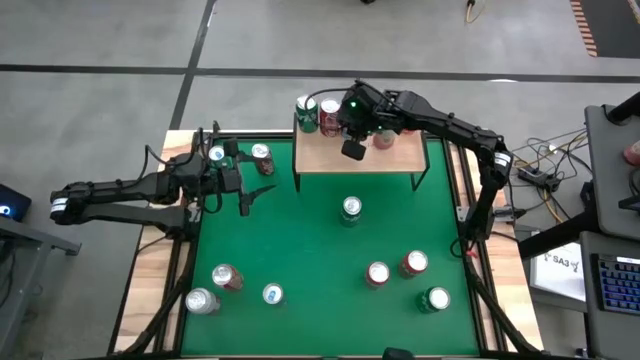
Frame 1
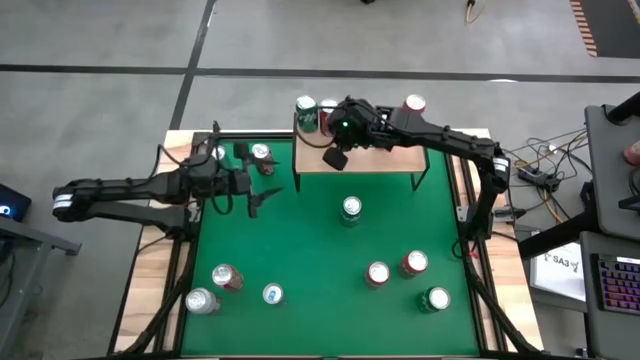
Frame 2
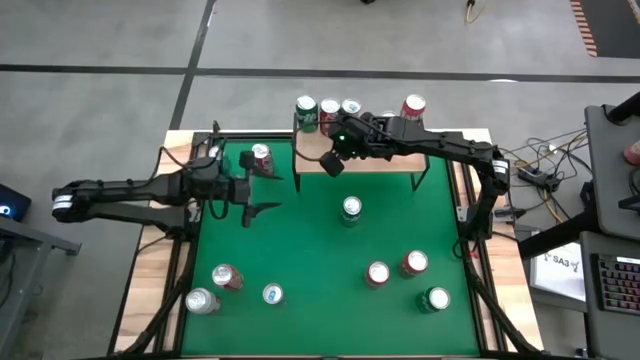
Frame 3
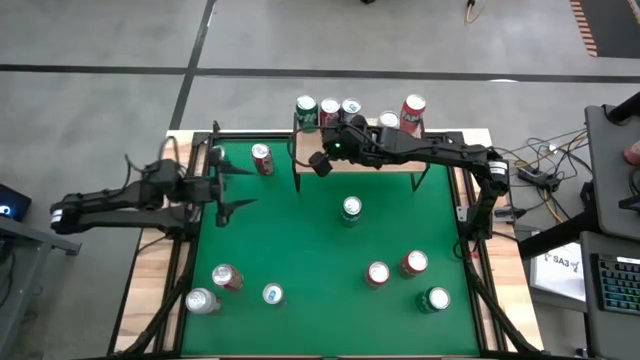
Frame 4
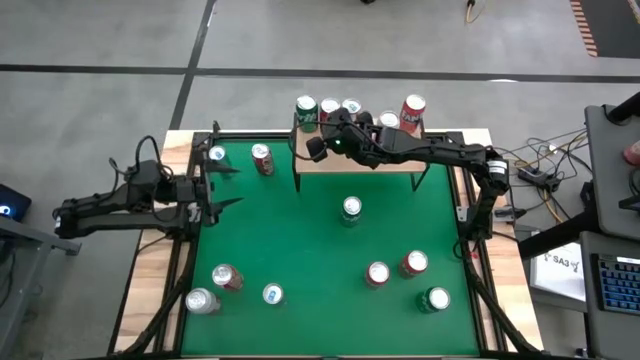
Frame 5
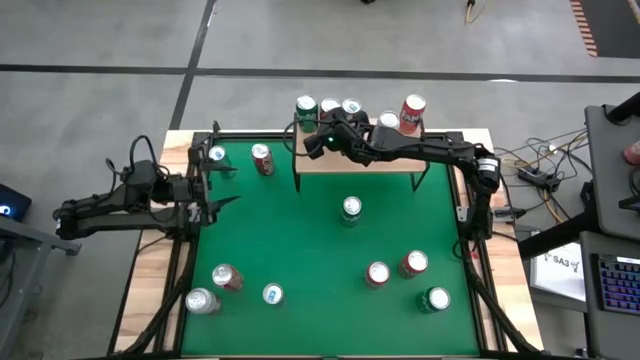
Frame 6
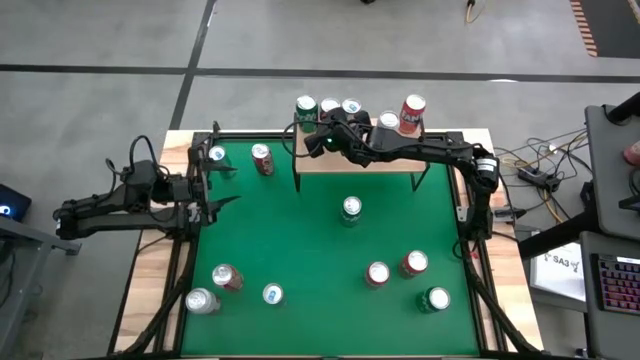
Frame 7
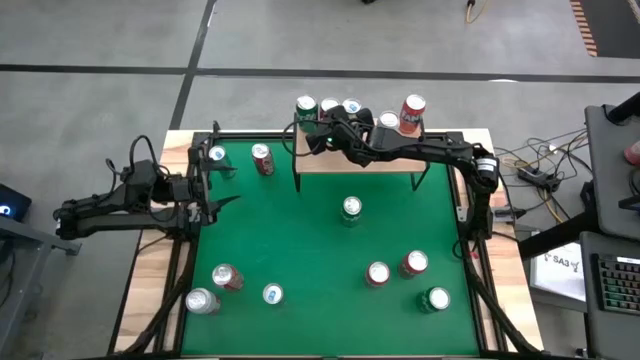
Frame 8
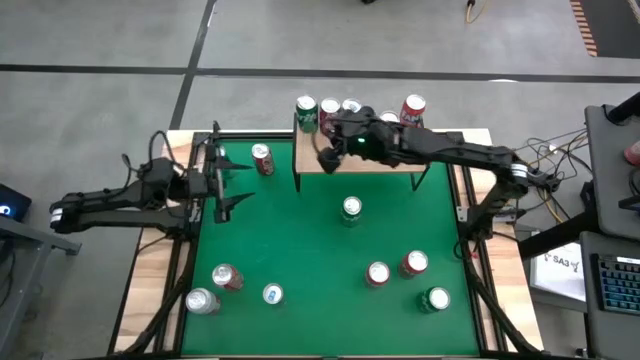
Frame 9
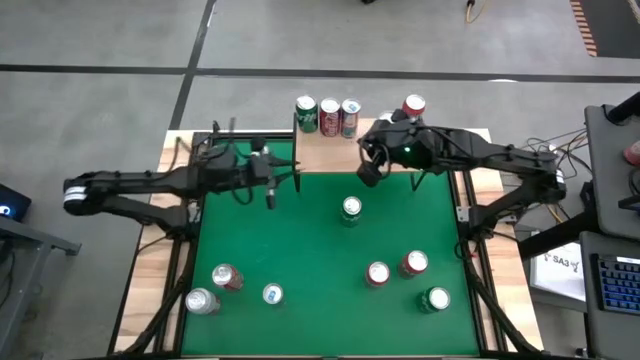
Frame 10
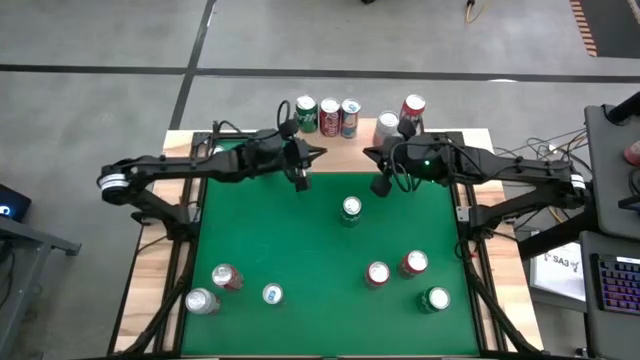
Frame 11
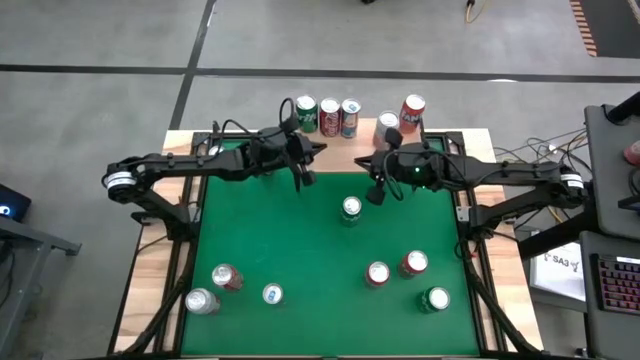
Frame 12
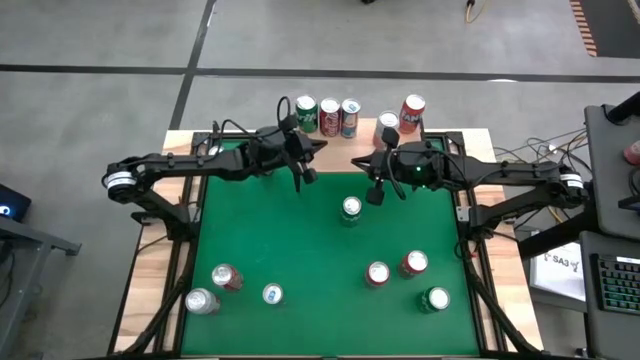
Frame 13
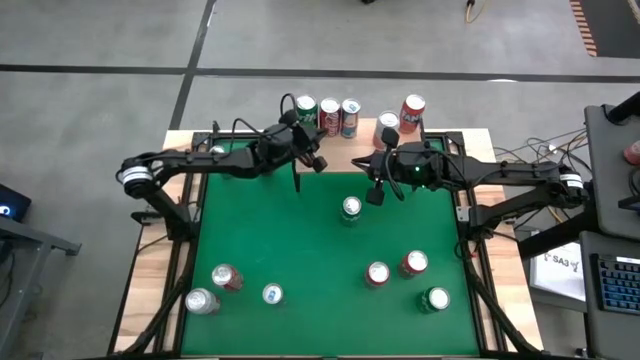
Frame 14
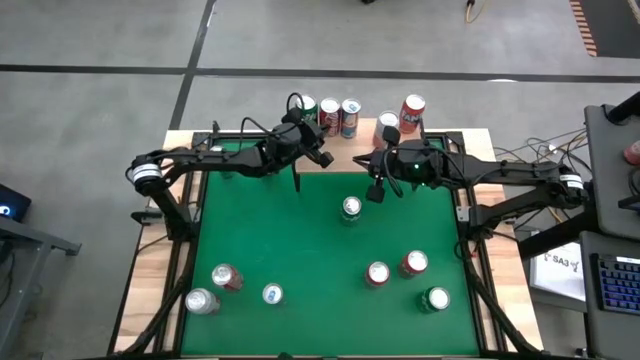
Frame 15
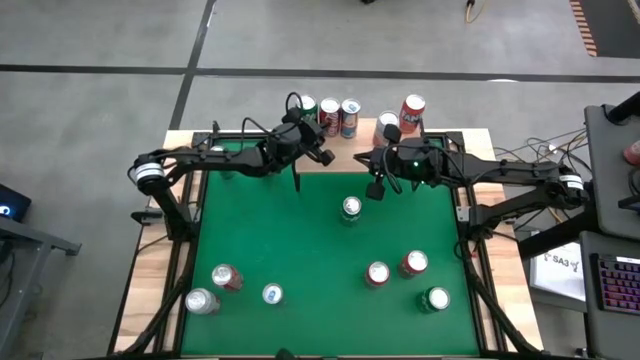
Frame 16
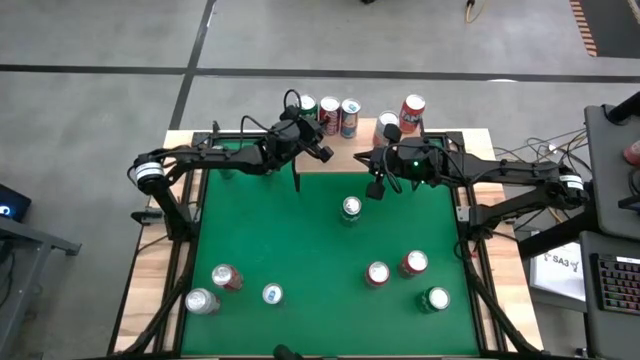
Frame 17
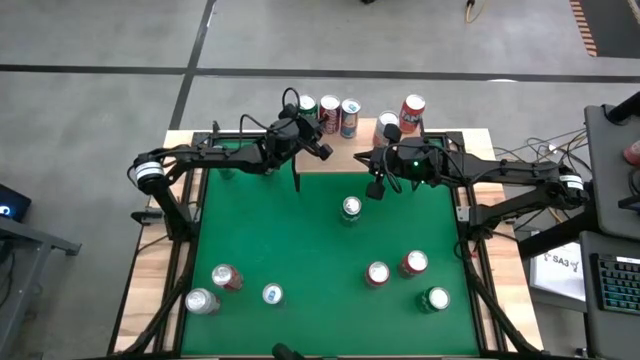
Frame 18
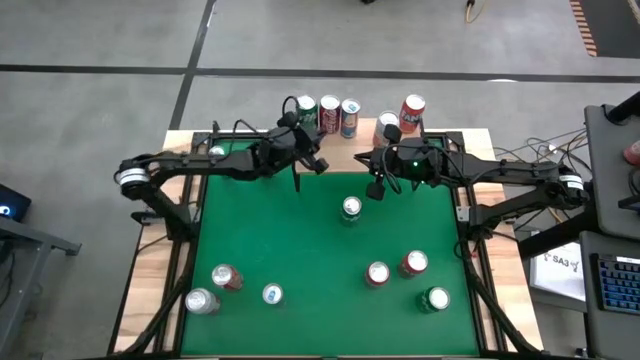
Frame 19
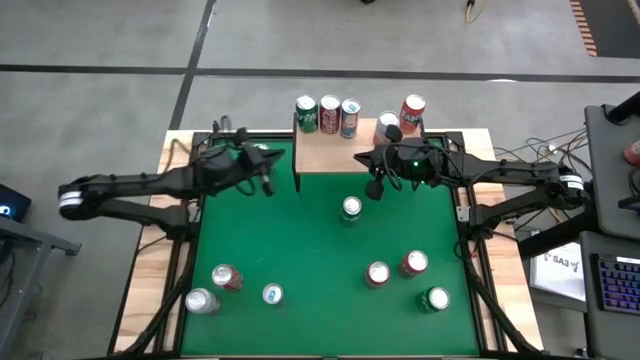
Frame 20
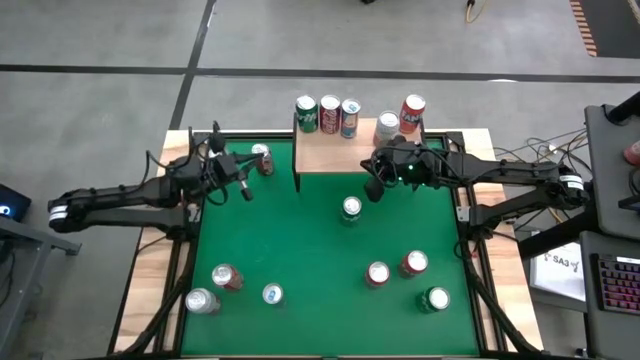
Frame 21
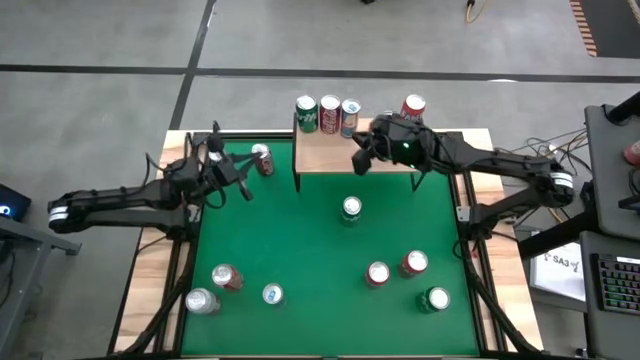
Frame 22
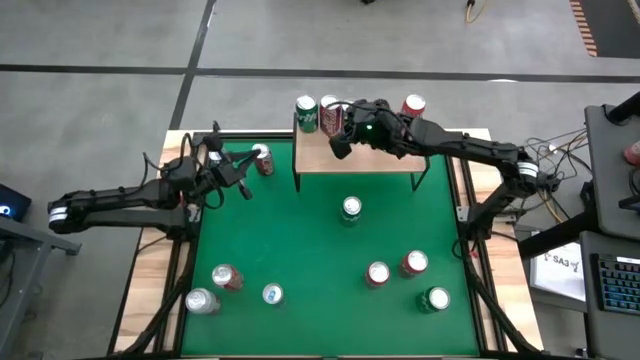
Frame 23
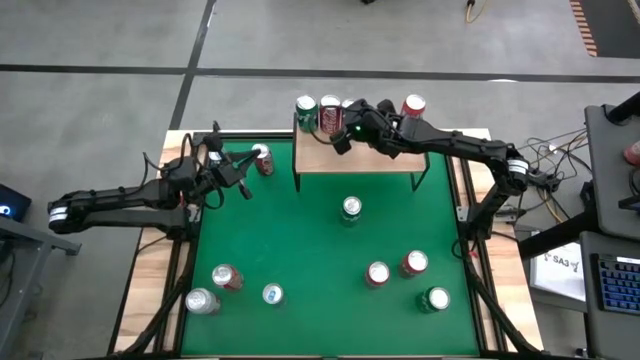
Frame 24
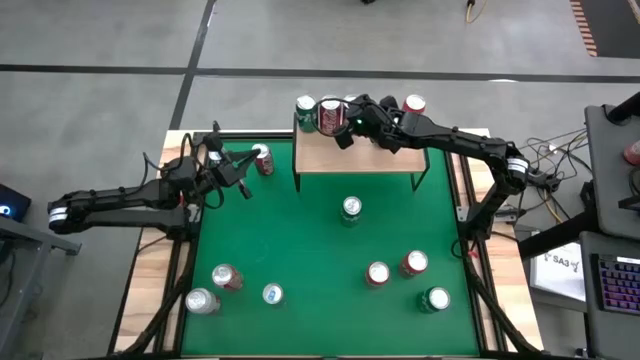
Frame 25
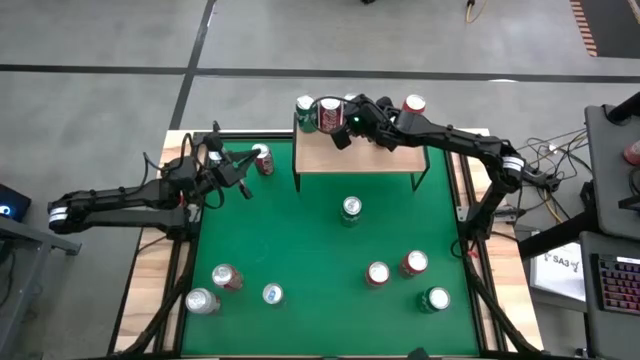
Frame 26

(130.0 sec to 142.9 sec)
Task: Place canned beverage on shelf
Adjust the soda cans on the shelf

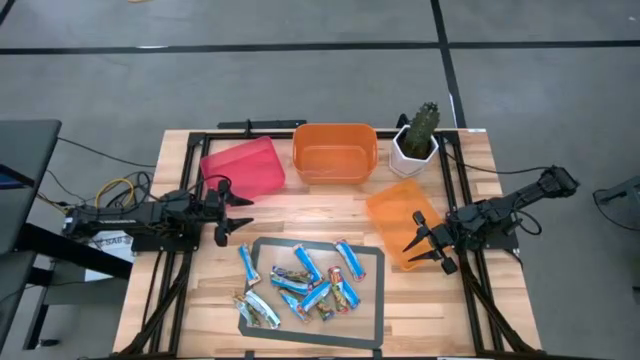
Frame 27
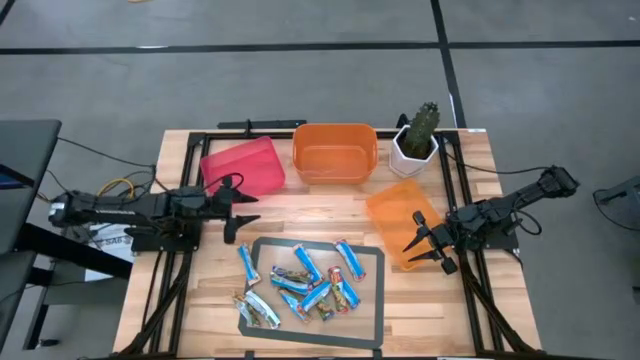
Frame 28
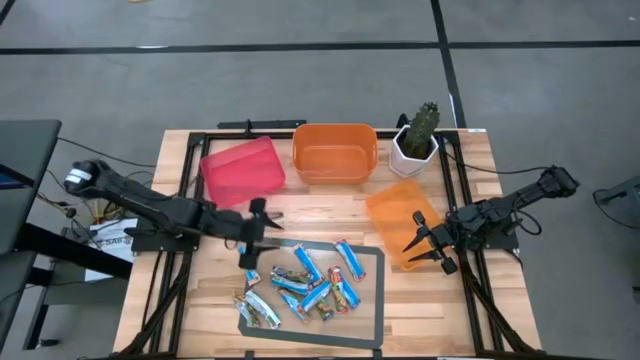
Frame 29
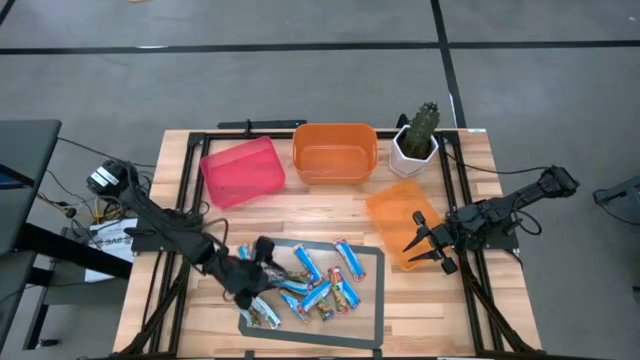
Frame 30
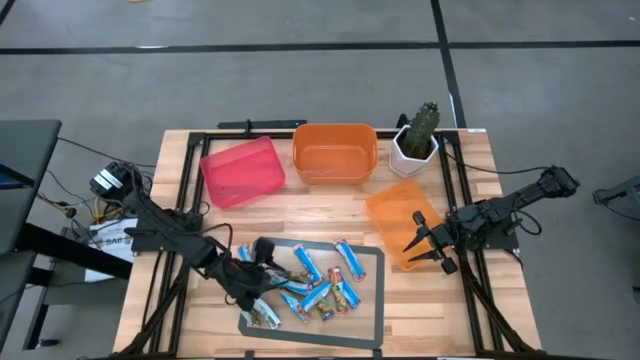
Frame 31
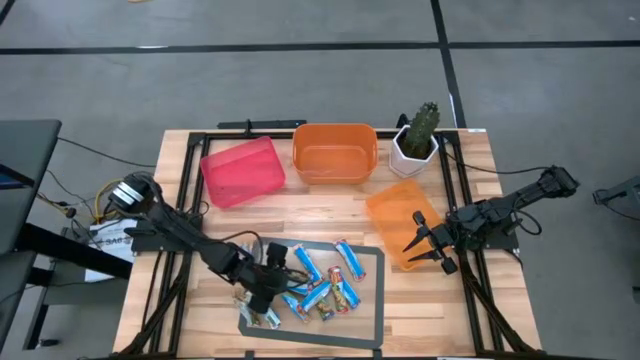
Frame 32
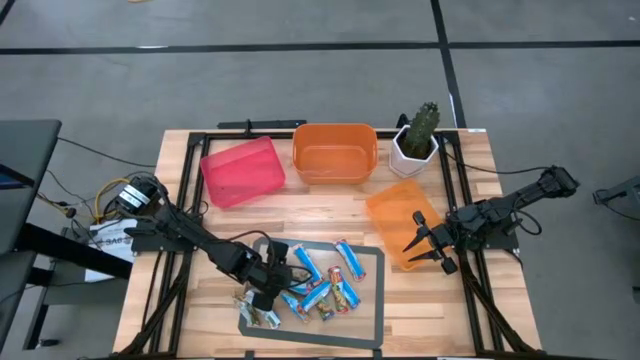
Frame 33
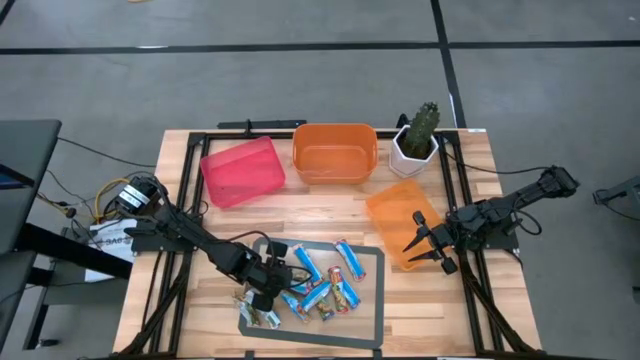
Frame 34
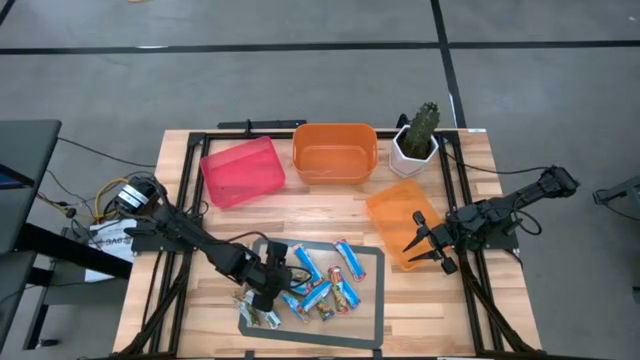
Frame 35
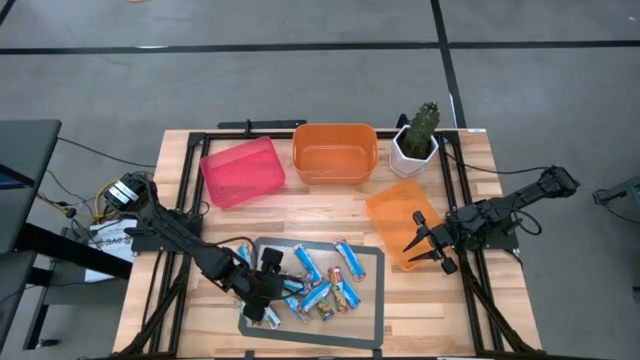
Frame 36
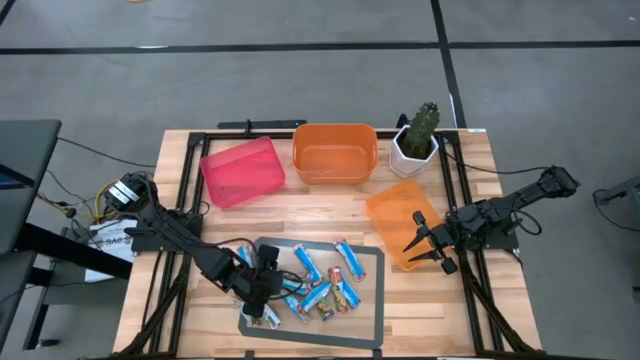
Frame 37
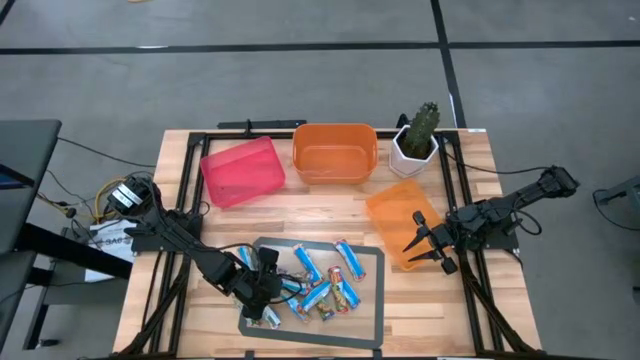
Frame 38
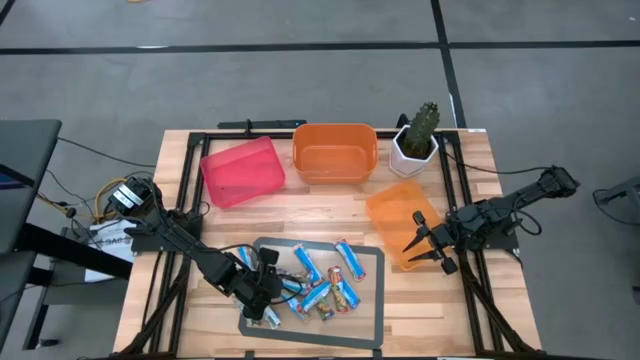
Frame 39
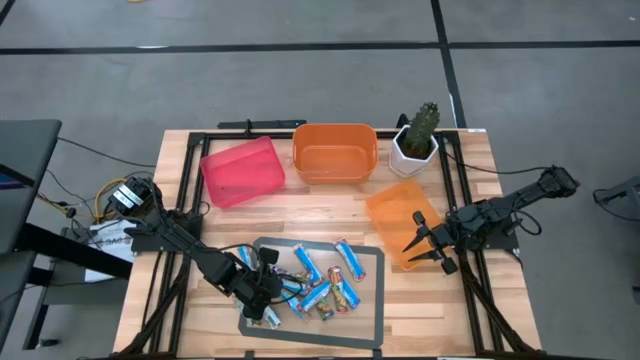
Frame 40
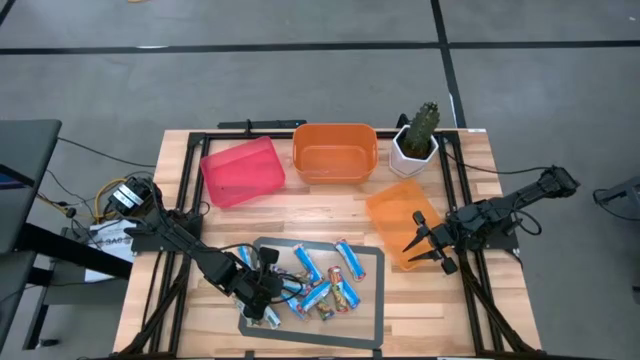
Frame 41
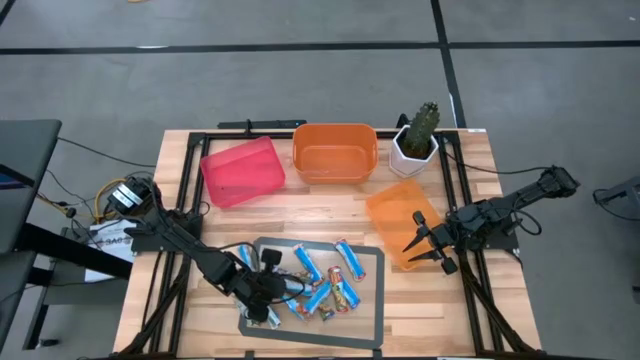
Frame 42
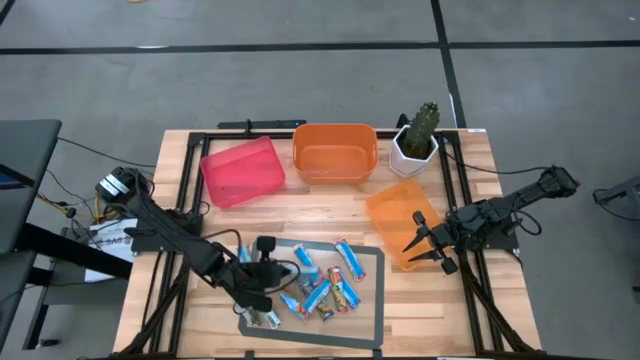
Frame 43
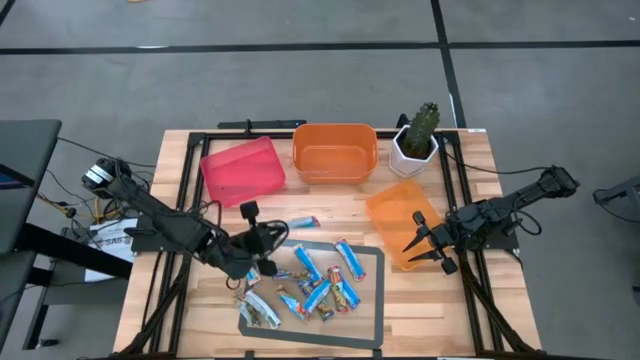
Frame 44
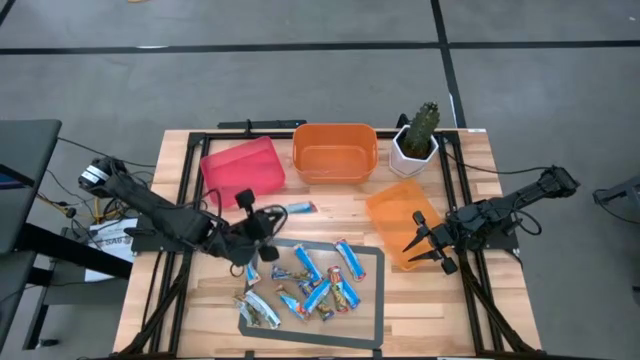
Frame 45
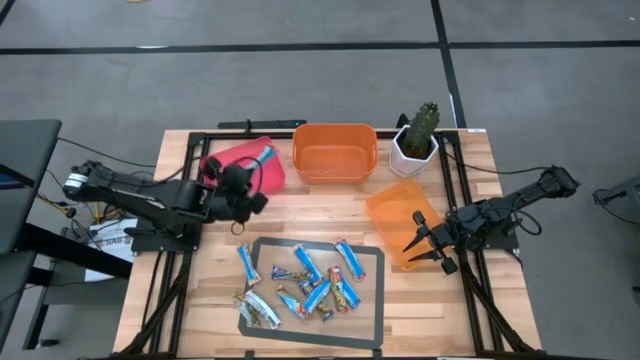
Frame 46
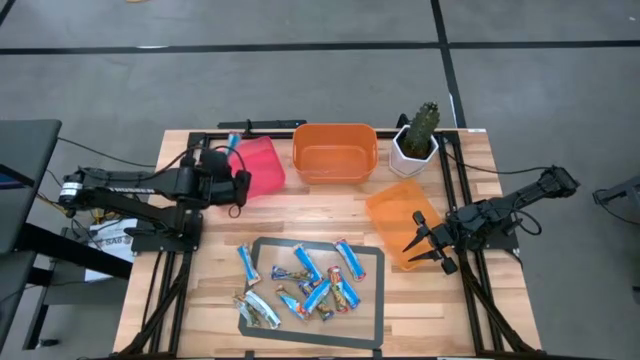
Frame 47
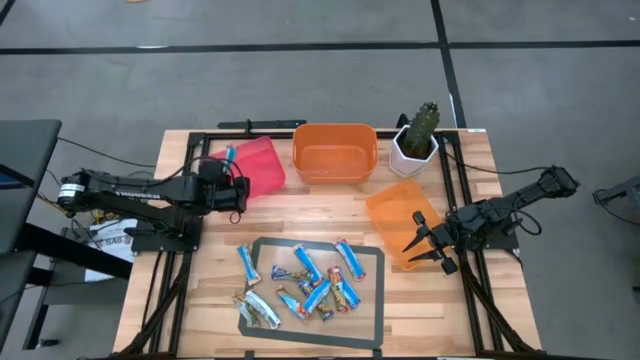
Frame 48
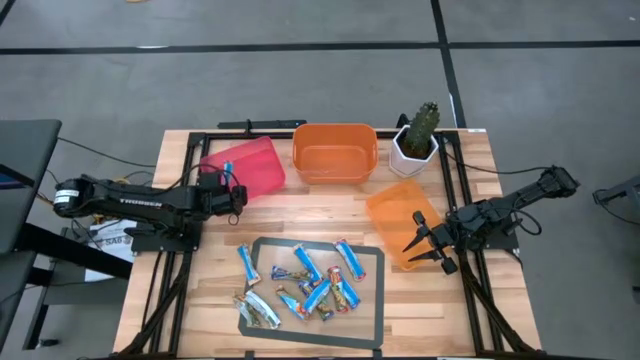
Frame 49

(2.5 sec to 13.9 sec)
Task: Pick and place Granola Bars by type
Put the red granola bar into the red bin
